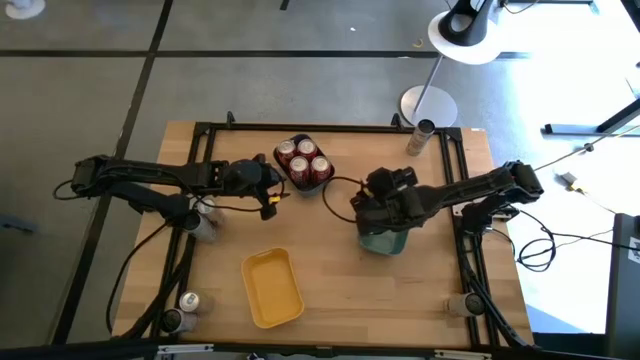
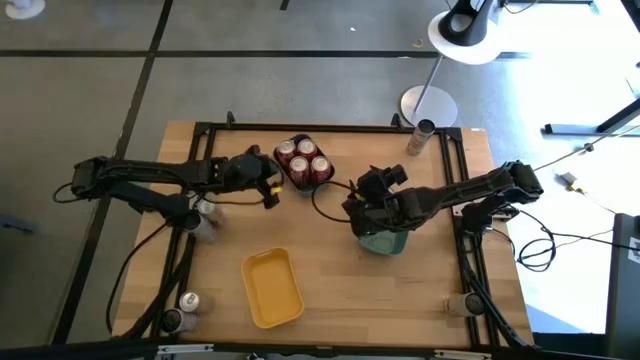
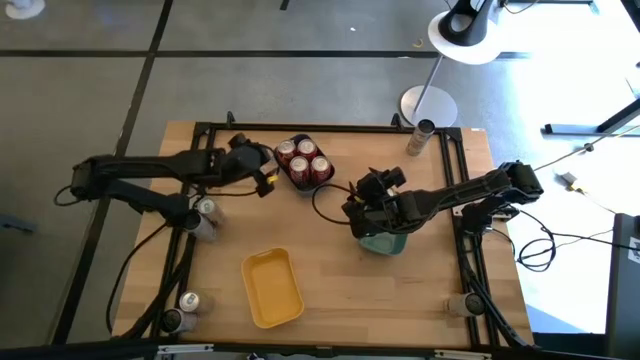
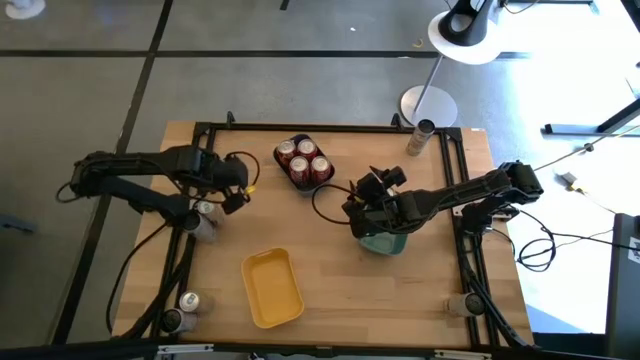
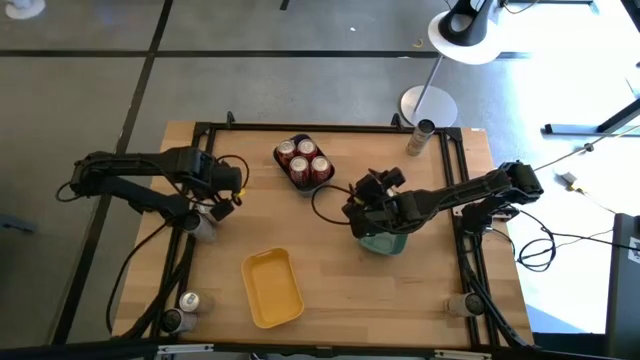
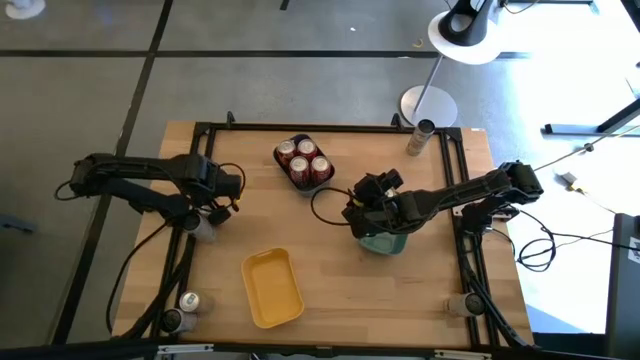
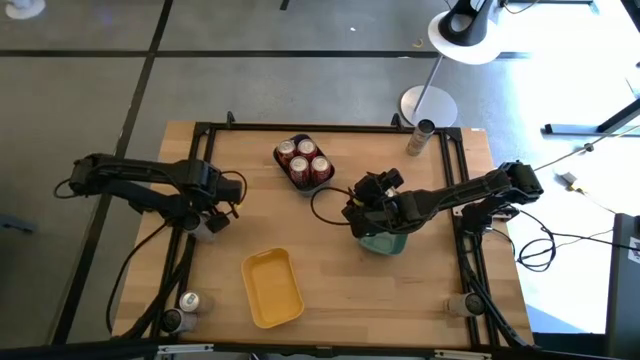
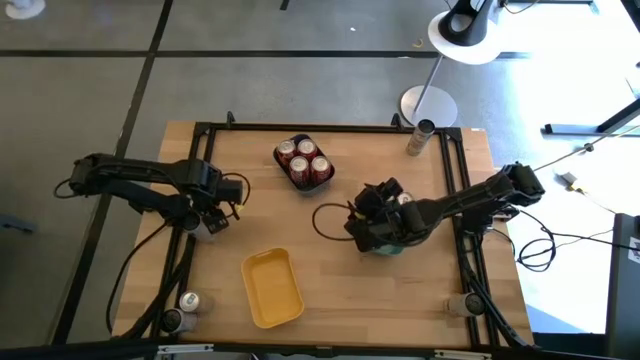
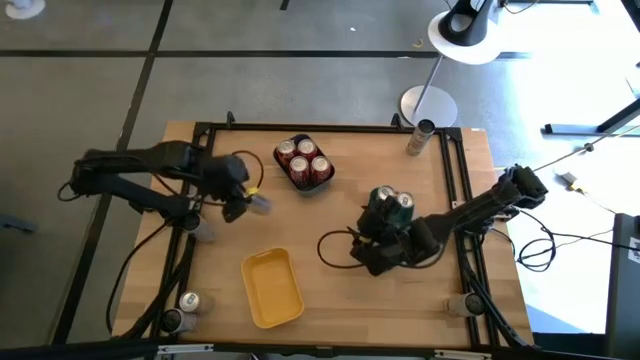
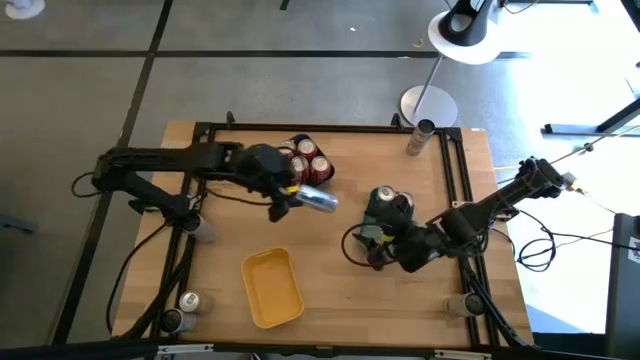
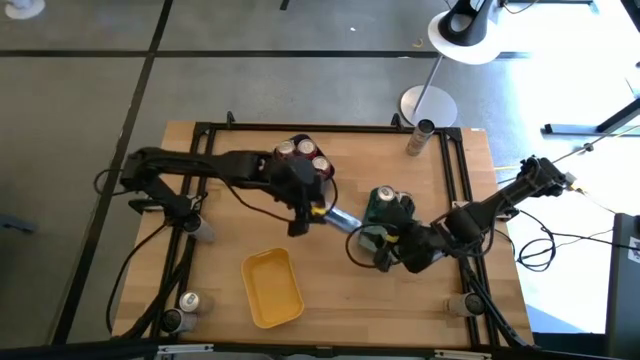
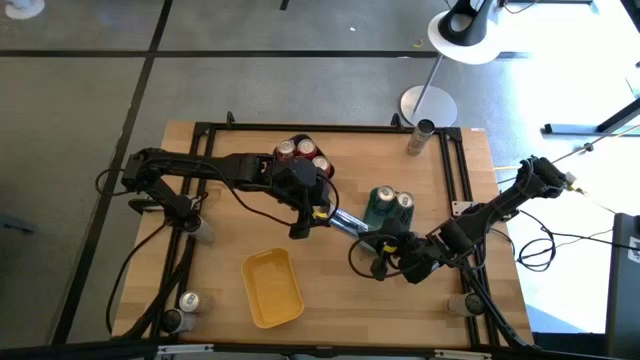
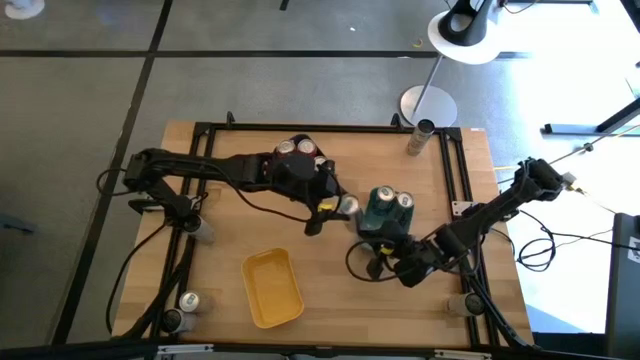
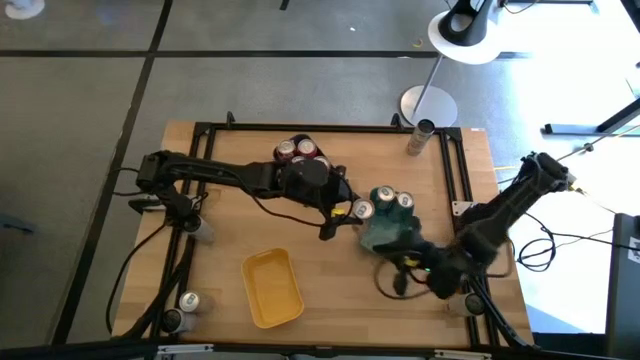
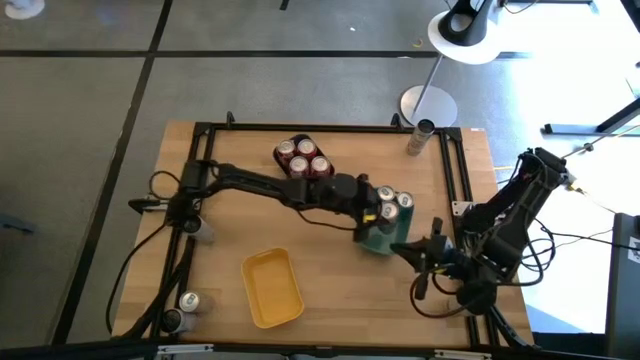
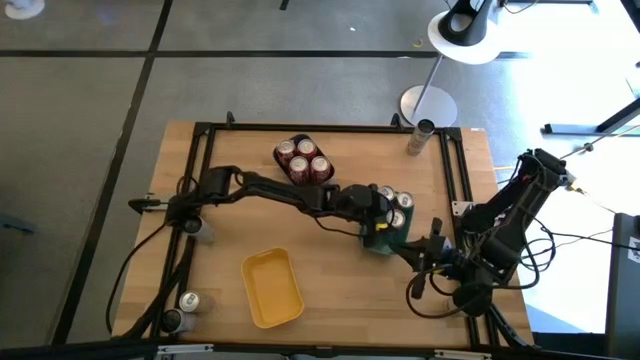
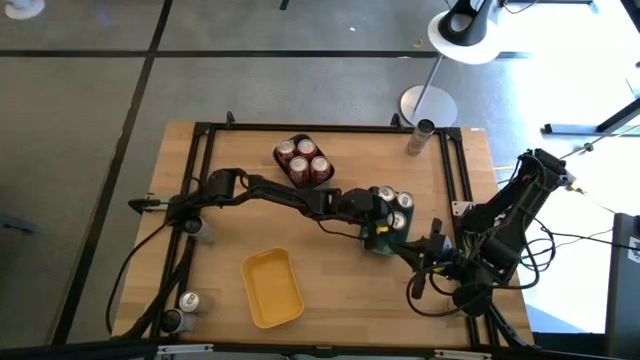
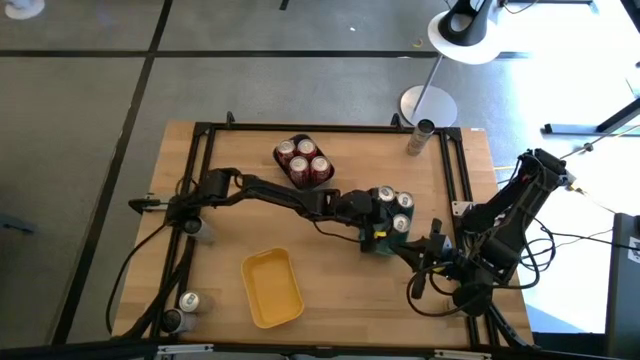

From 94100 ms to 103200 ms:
Task: Sort soda cans
Put the blue soda can into the green bin

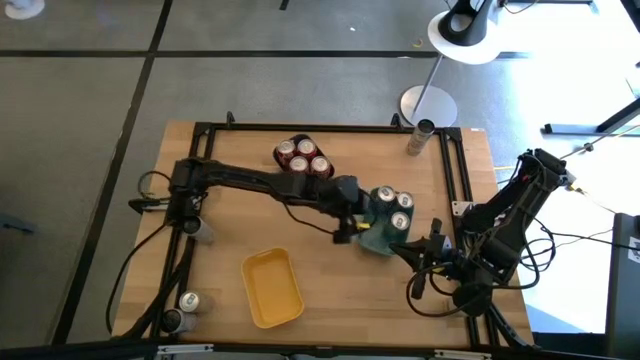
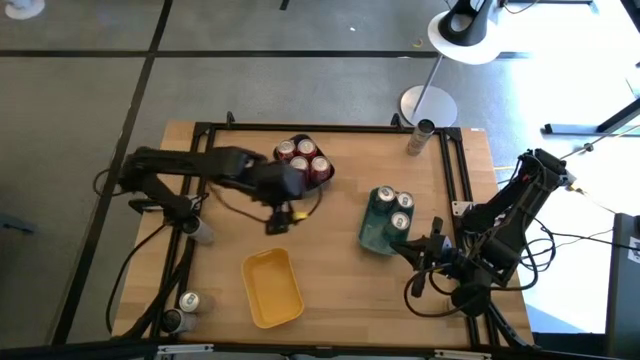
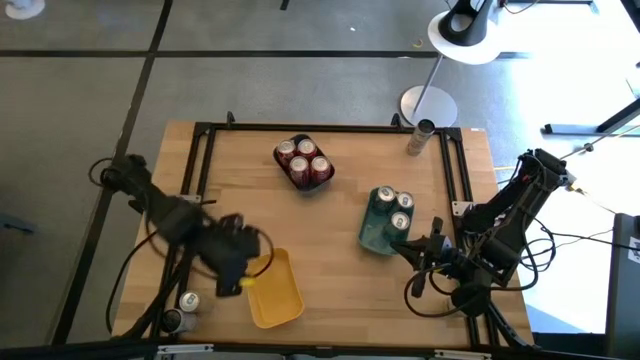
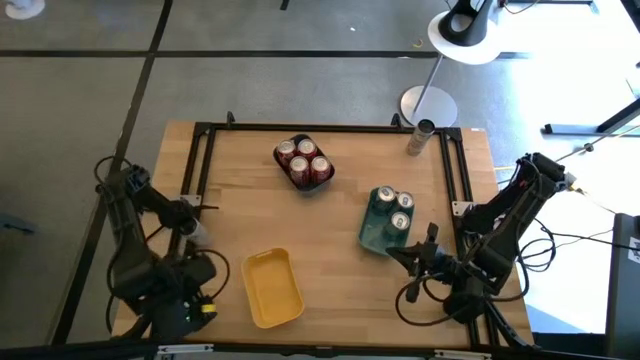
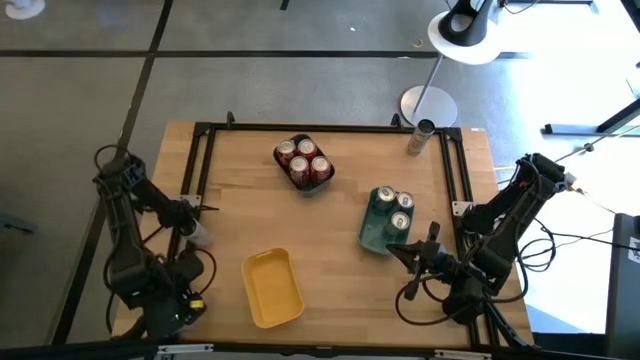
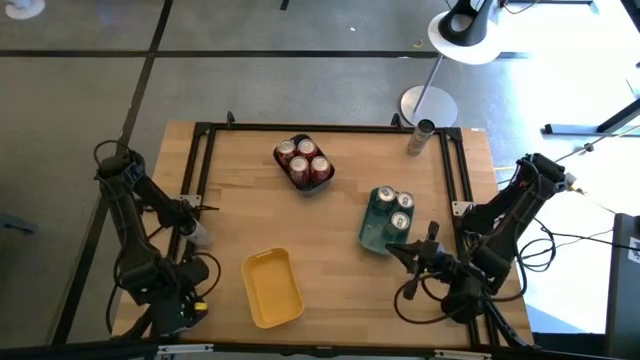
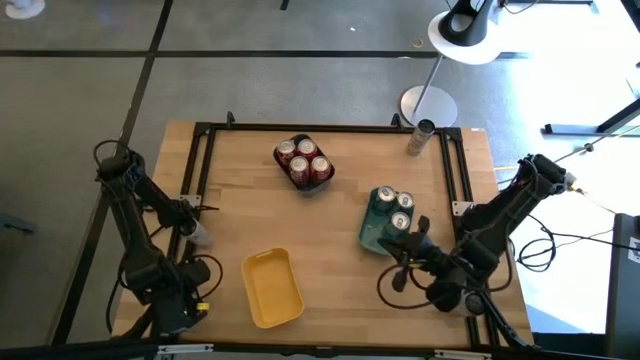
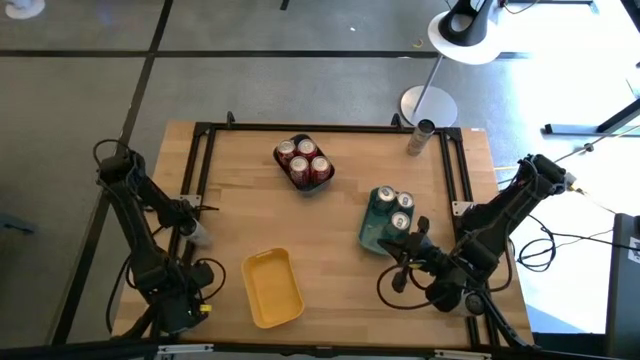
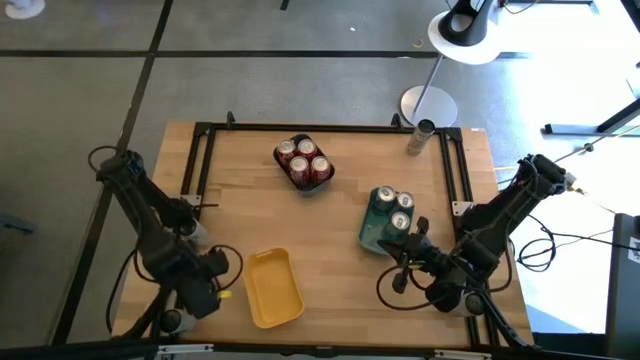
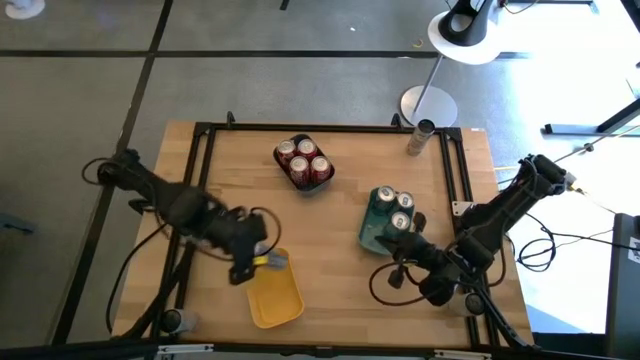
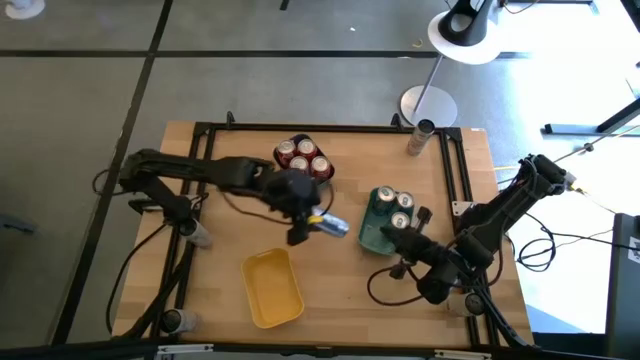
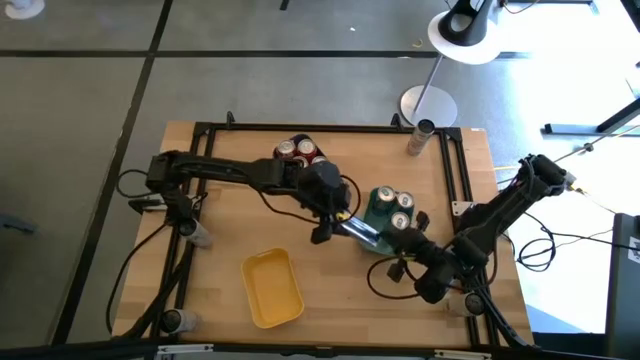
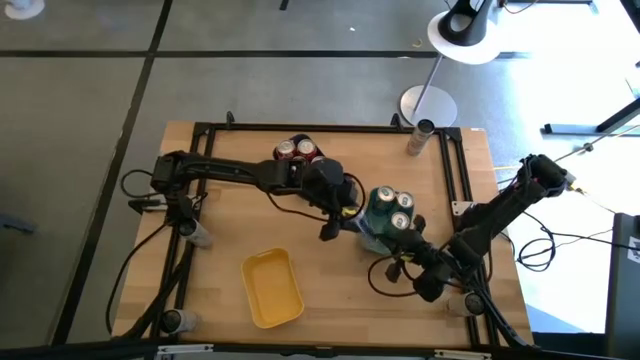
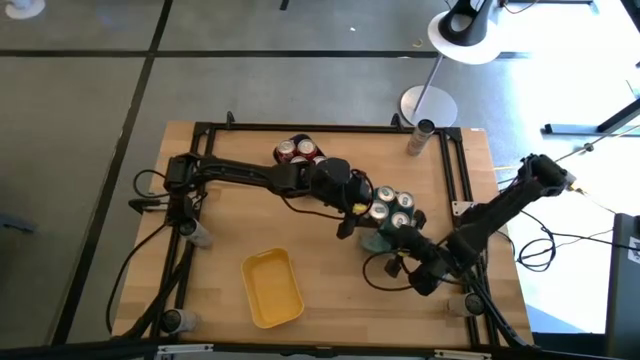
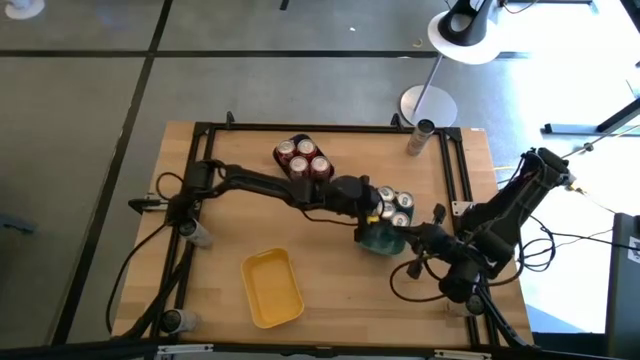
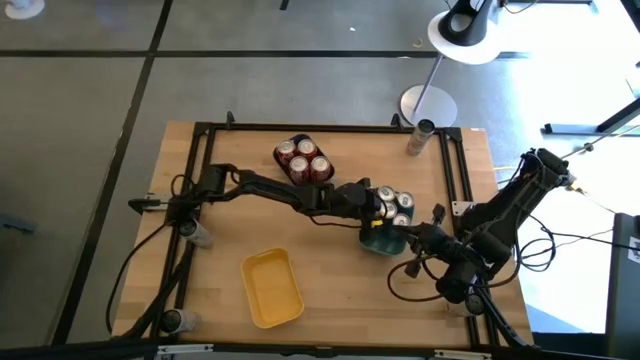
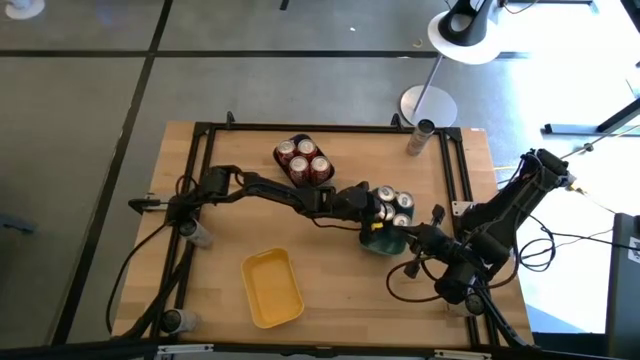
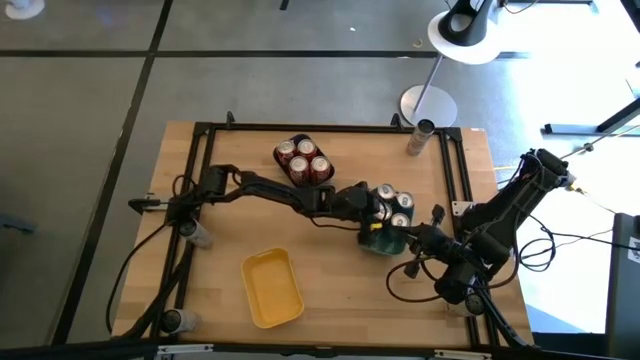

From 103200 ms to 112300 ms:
Put the blue soda can into the green bin
